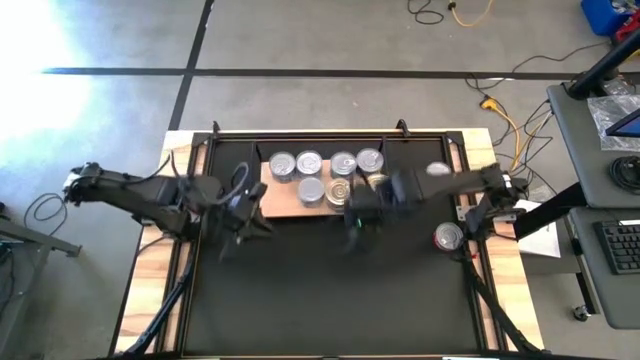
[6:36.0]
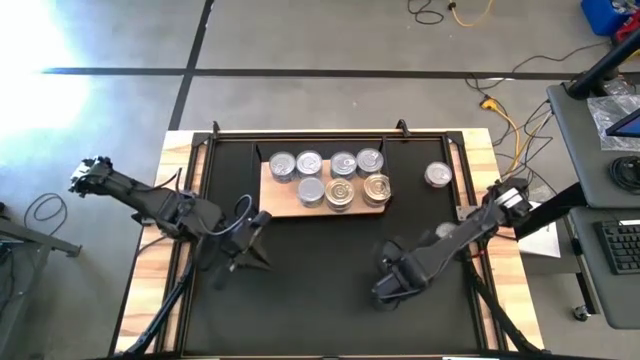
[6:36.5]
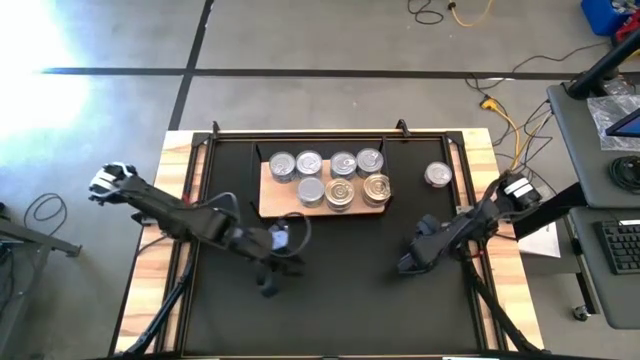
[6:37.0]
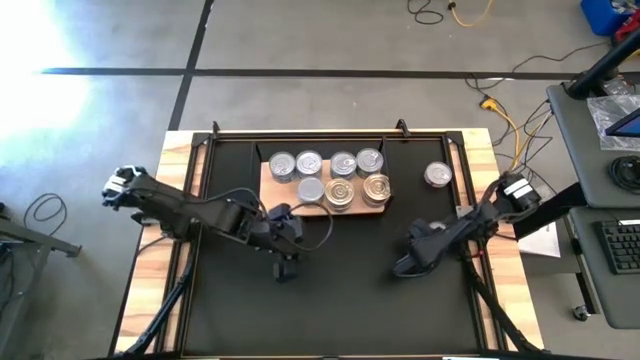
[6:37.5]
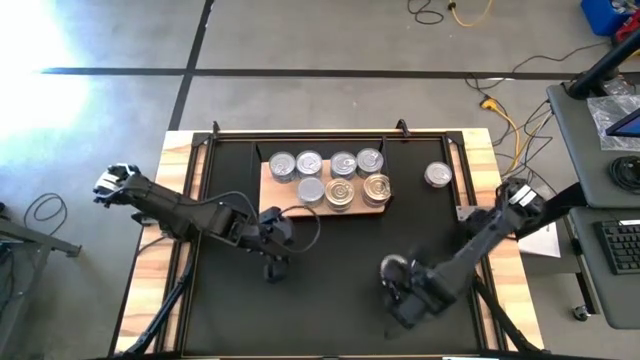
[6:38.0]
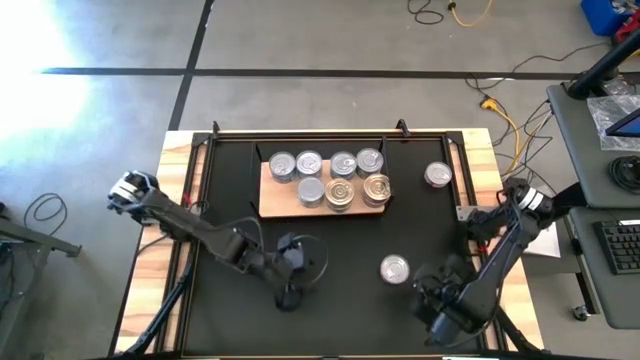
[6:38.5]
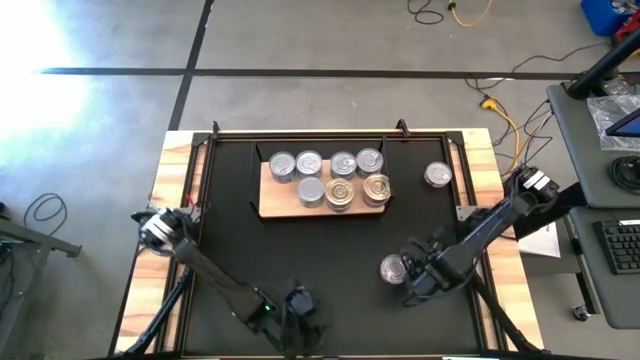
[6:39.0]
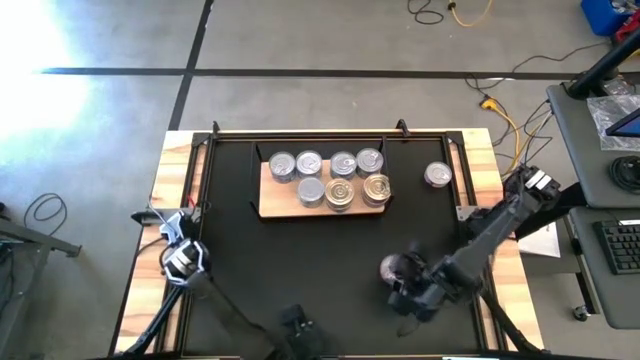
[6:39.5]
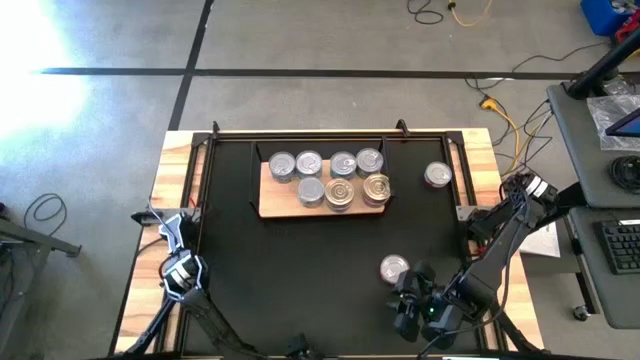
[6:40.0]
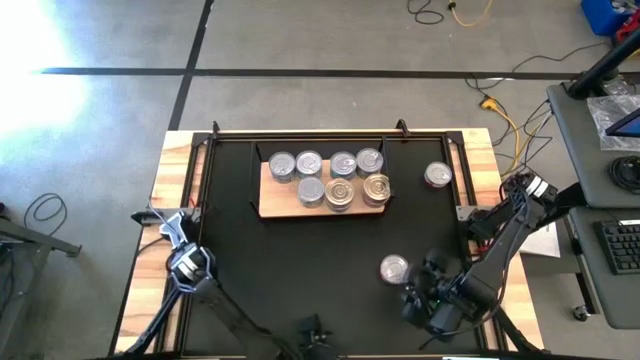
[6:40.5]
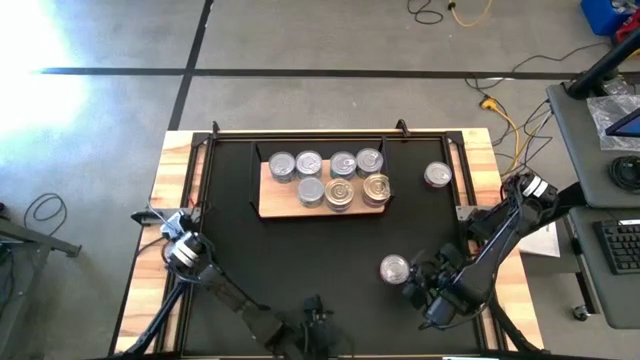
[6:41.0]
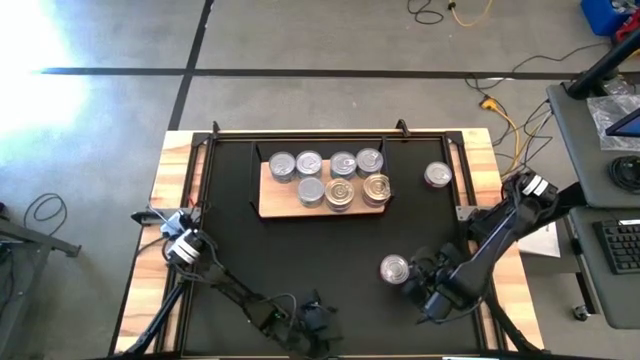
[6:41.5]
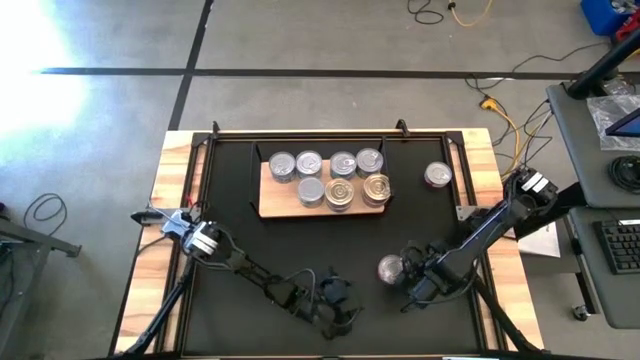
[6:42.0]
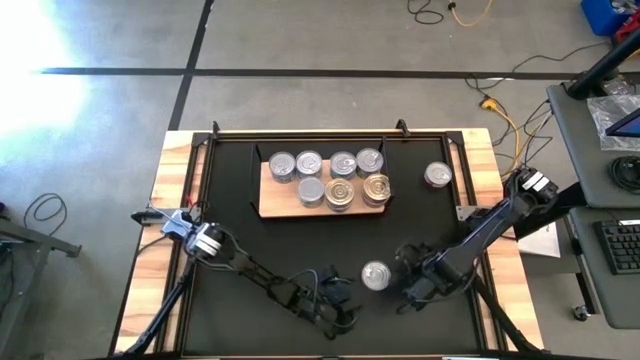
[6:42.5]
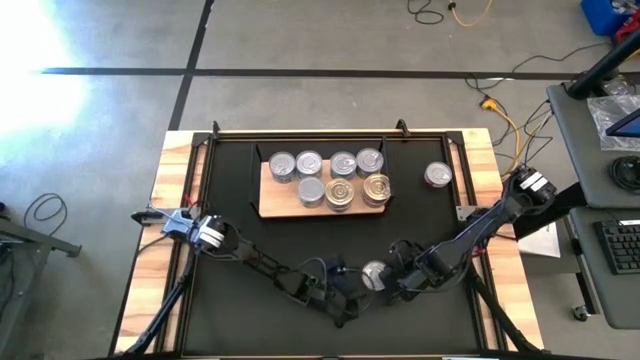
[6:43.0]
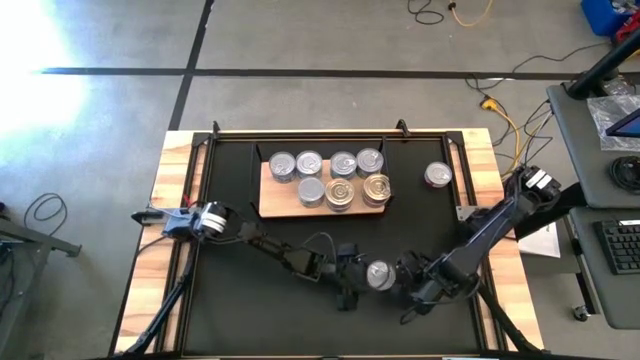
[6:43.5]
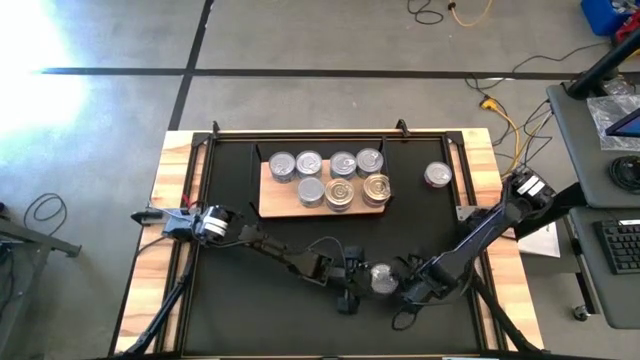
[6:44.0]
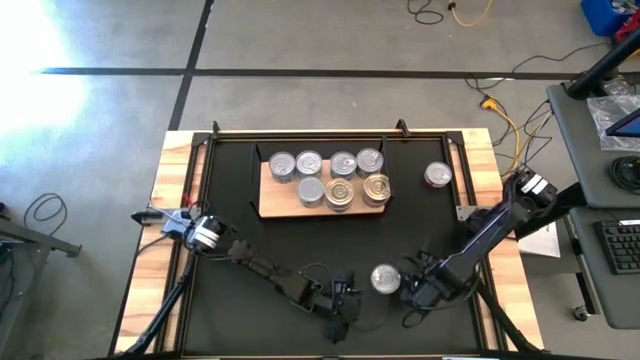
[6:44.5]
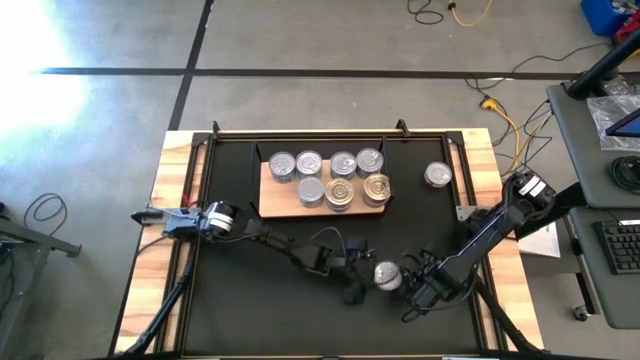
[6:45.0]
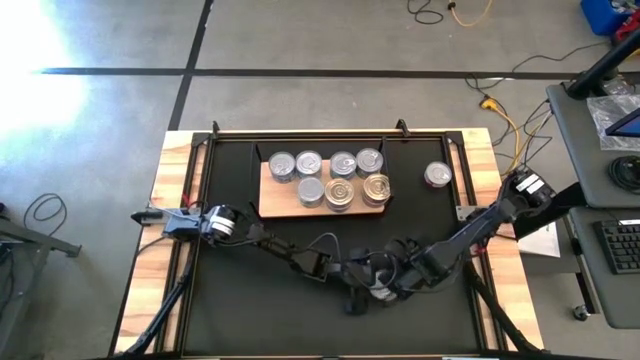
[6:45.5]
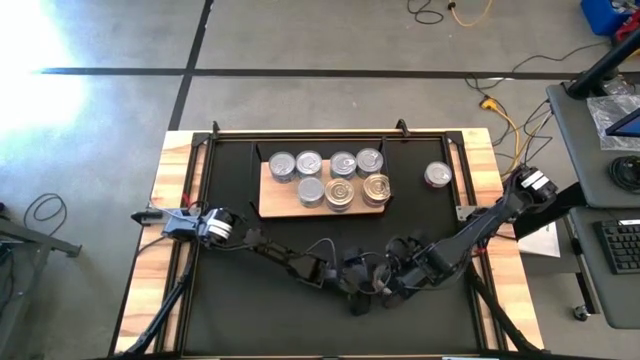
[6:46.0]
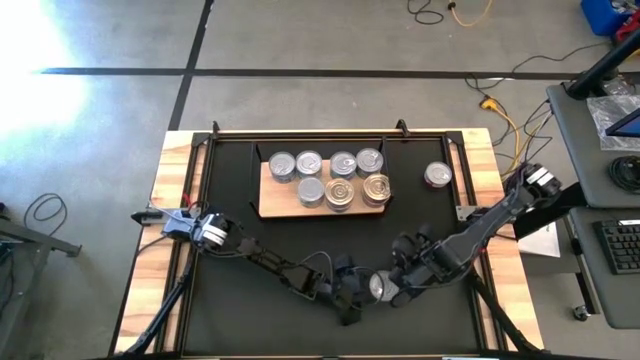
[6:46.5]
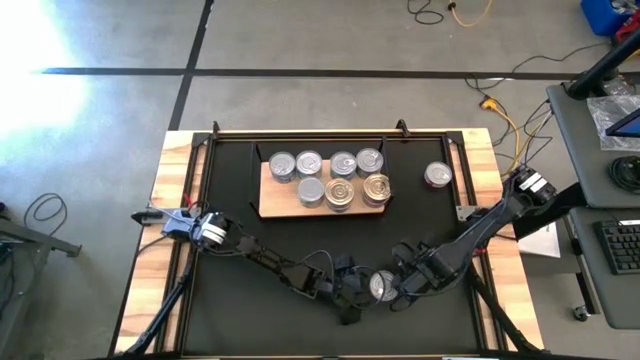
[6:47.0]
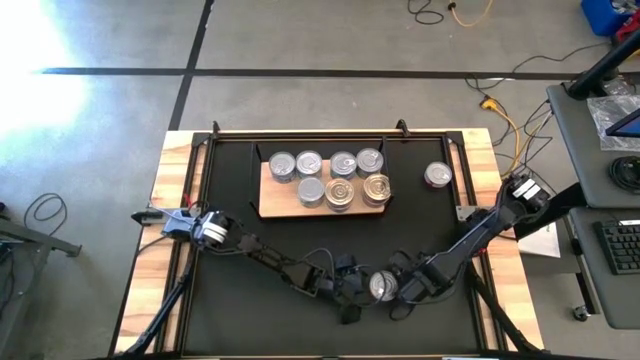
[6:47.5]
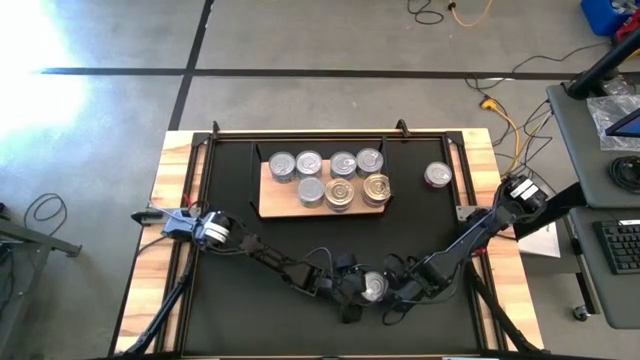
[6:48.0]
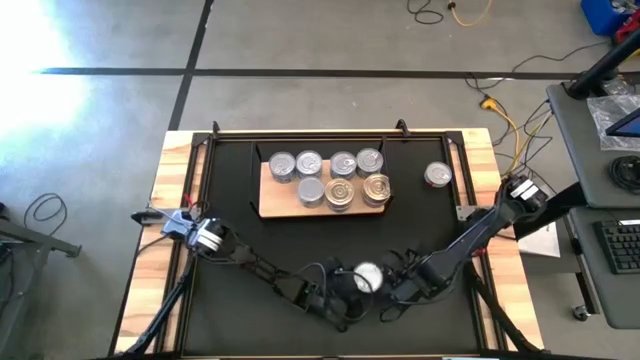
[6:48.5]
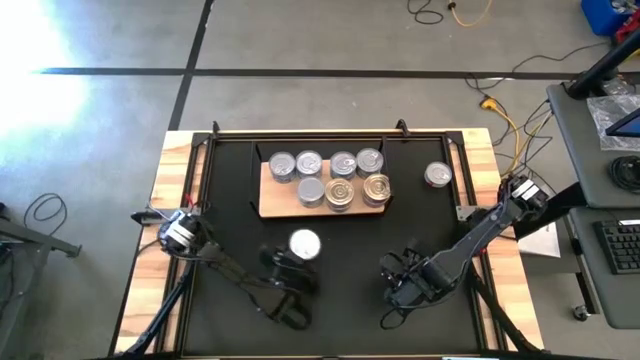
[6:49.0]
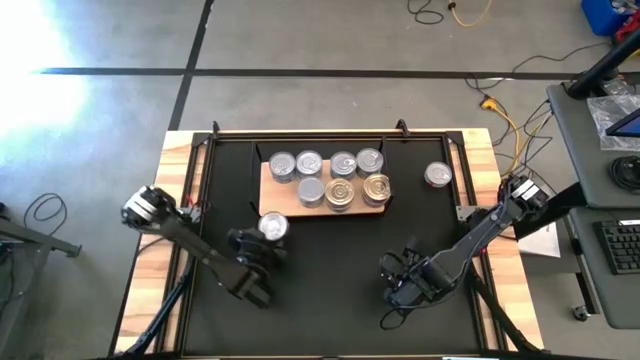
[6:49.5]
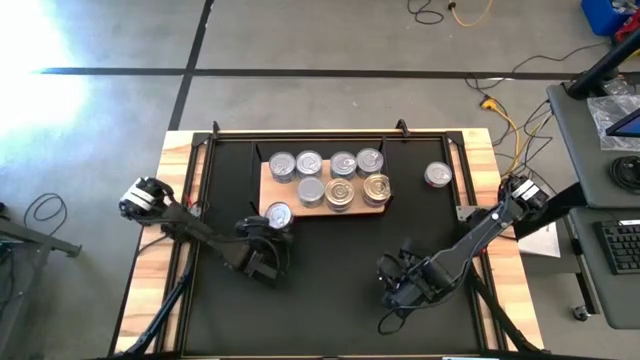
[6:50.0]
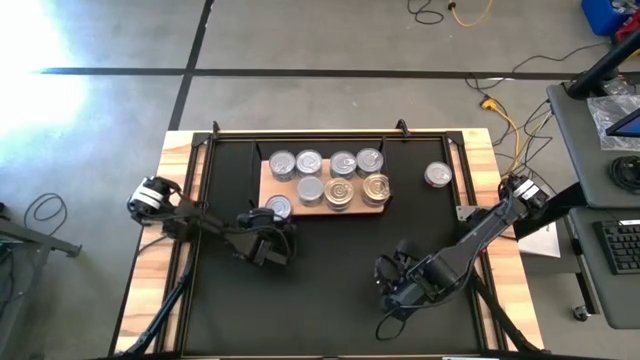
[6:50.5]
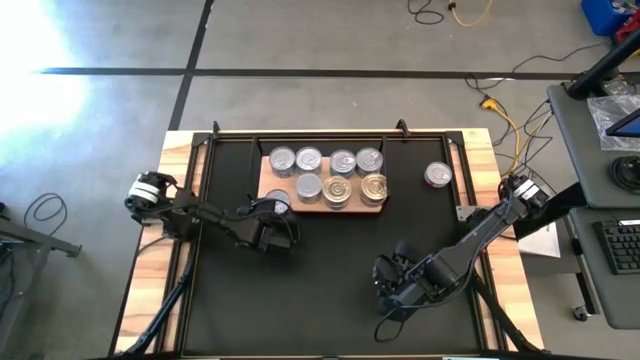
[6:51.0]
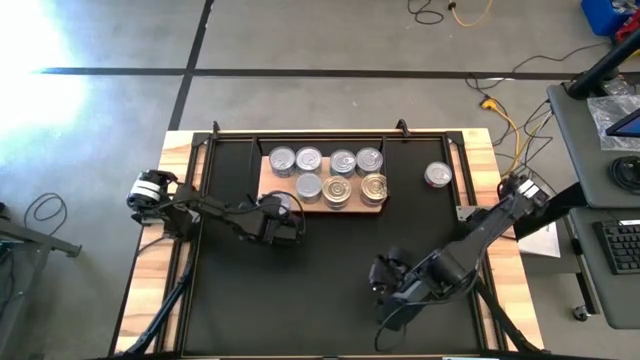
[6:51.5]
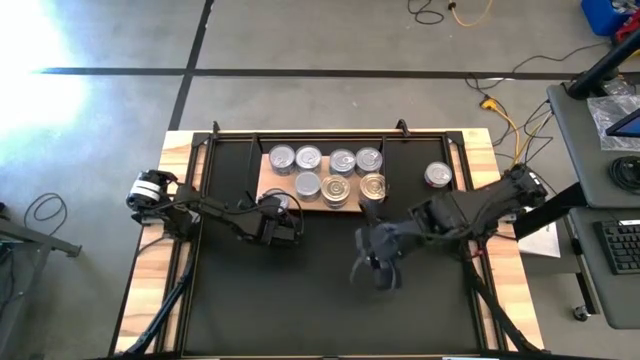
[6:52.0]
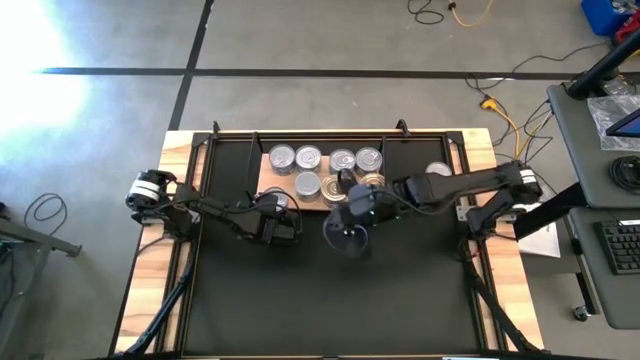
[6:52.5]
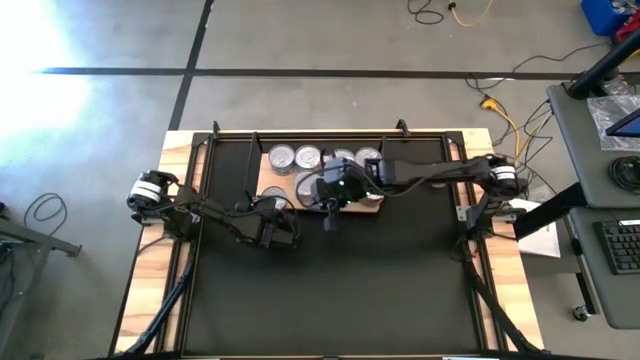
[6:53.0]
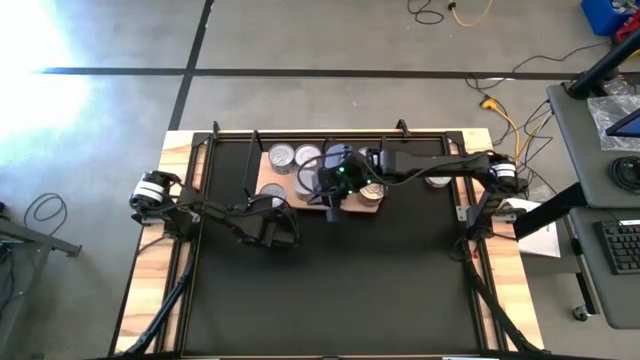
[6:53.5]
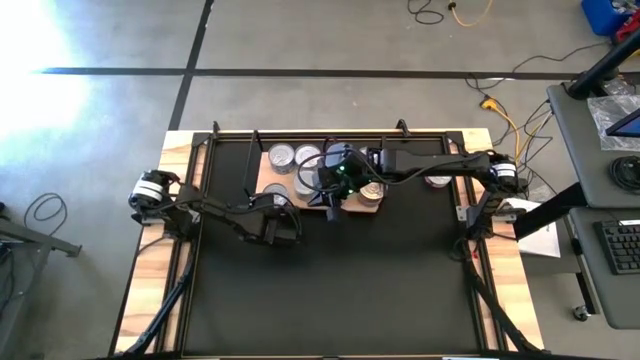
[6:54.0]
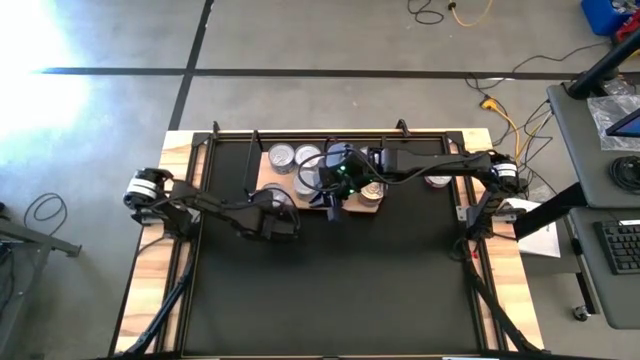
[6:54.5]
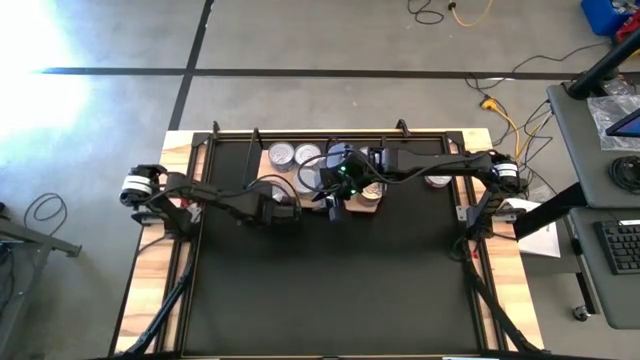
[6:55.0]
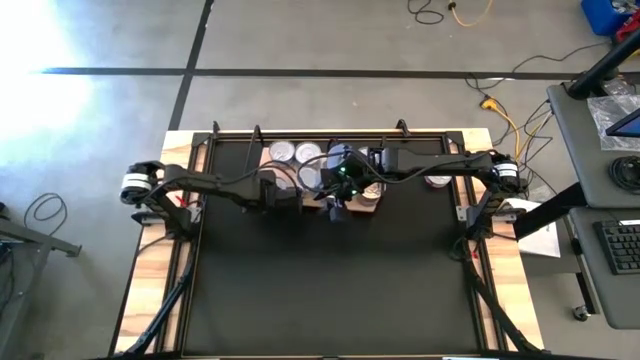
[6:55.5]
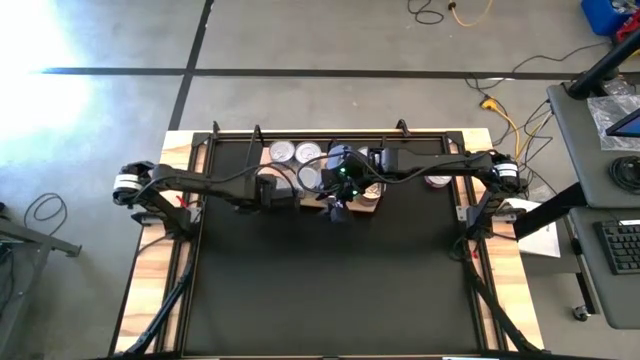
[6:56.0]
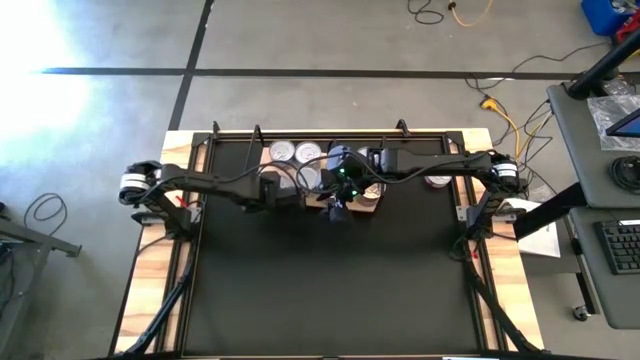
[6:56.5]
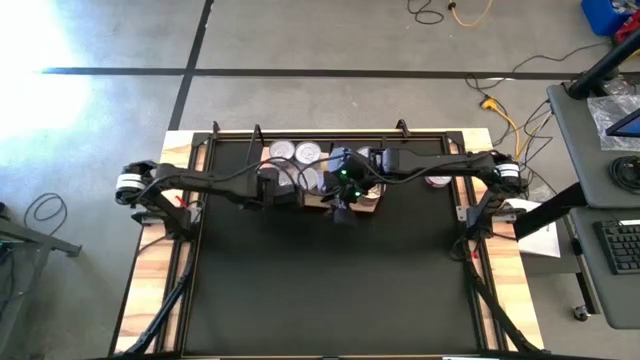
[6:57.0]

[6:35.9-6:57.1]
Task: Stack canned seafood by type on shelf
Put the bottom red tuna can on the shelf

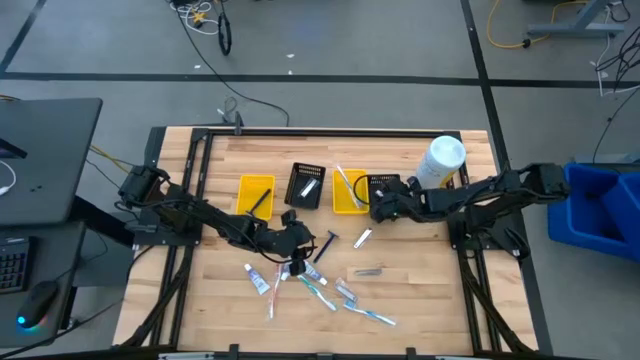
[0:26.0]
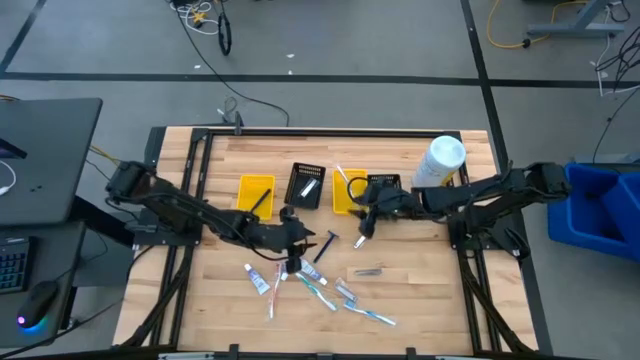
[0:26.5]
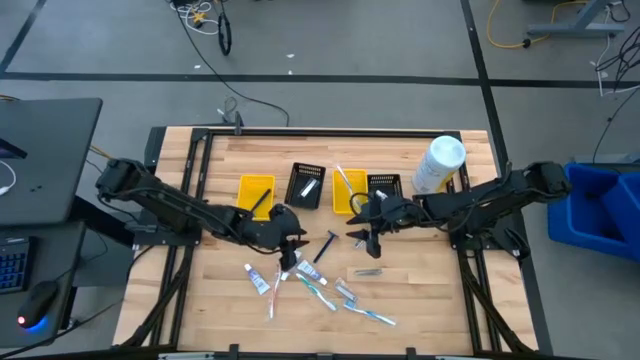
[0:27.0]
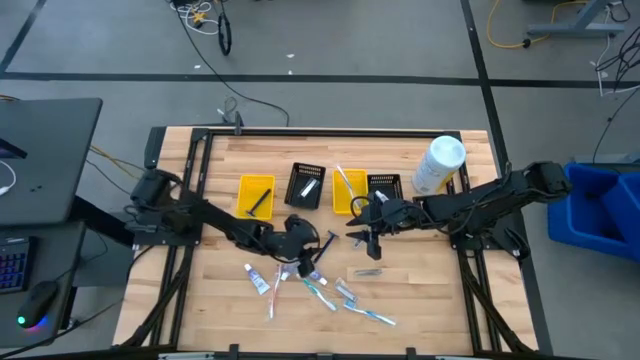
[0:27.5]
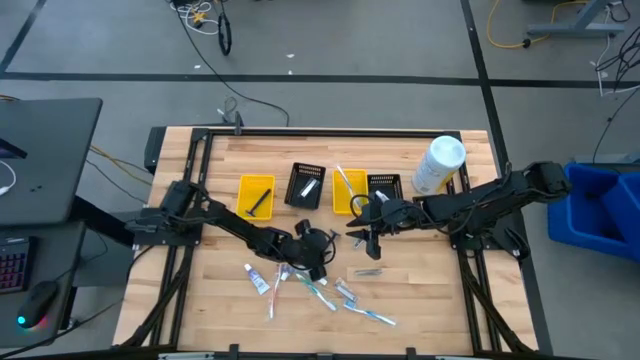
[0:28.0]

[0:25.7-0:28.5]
Task: Pick & Place Travel size toiletries
Put the blue razor into the left yellow bin
